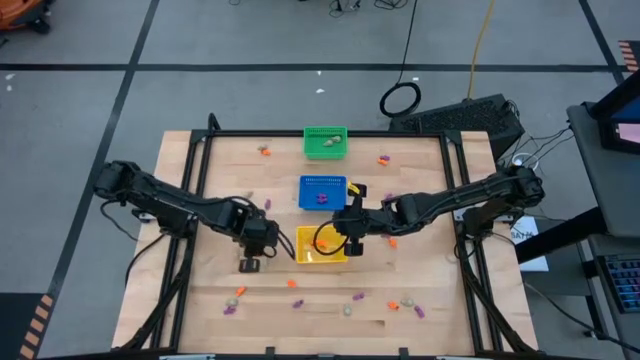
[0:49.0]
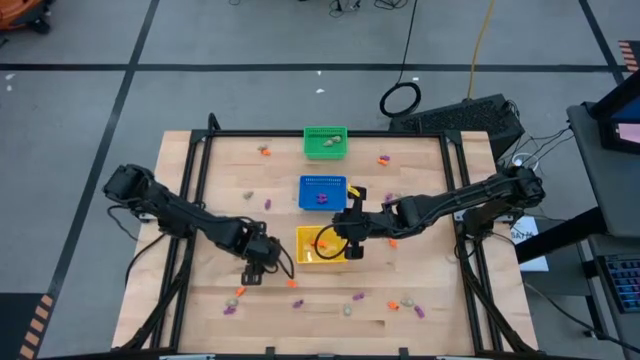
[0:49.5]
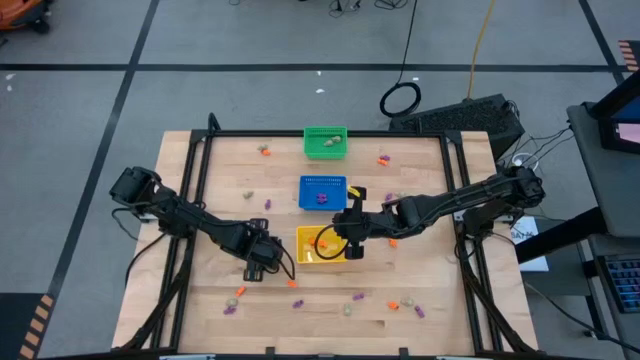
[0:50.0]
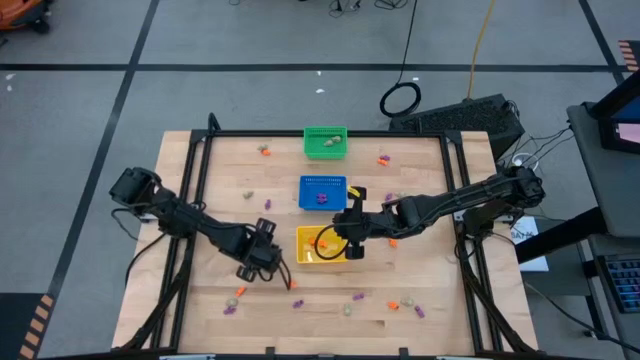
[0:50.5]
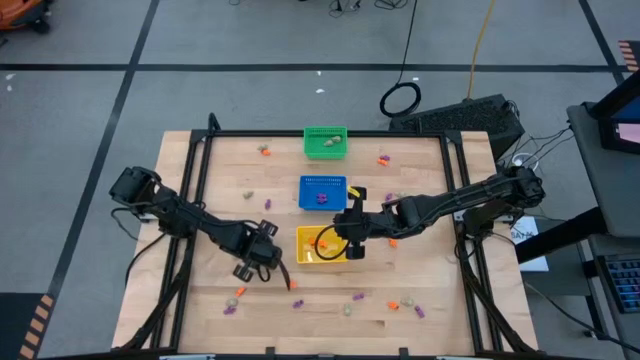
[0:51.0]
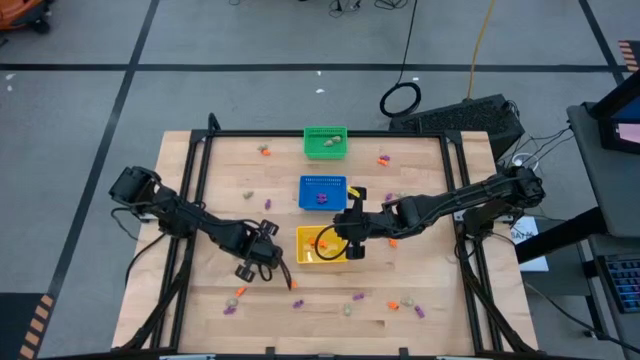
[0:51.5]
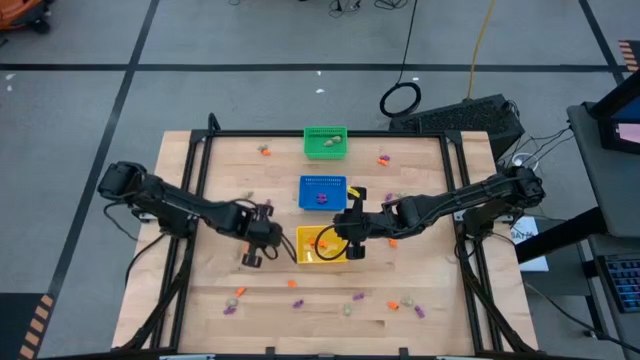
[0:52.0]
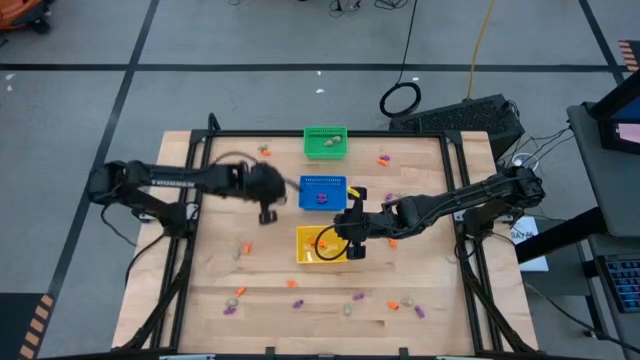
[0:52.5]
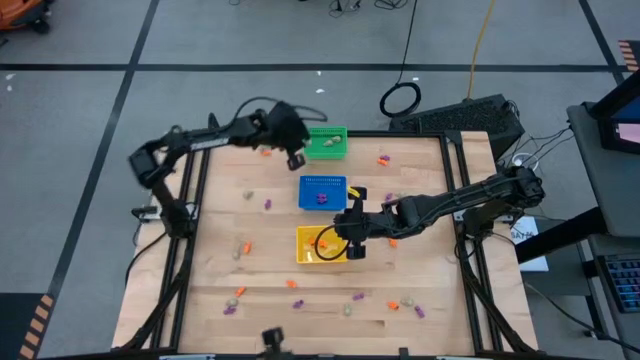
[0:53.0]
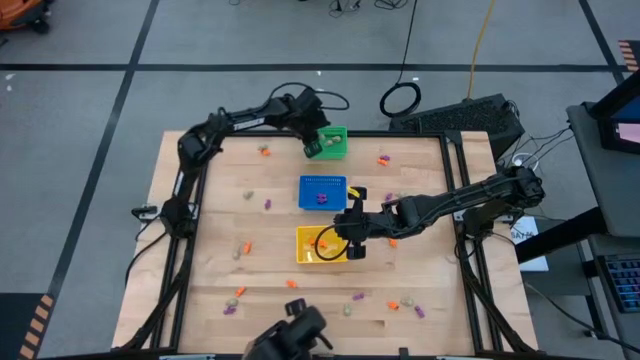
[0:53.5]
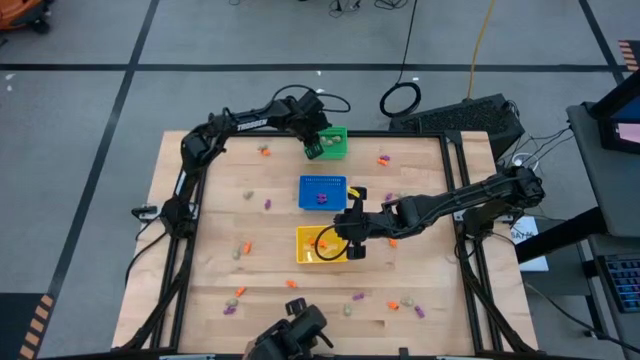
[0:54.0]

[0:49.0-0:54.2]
Task: Sort Halloween decoration
Put the white skull toy into the green bin

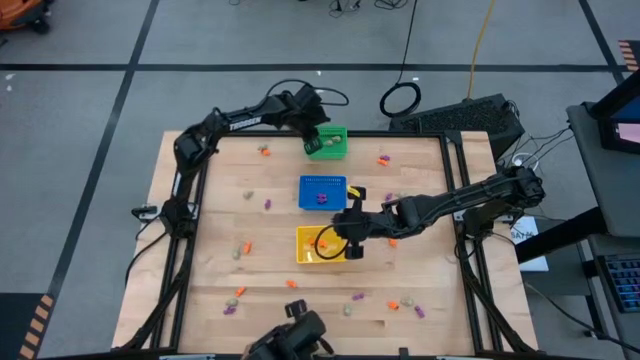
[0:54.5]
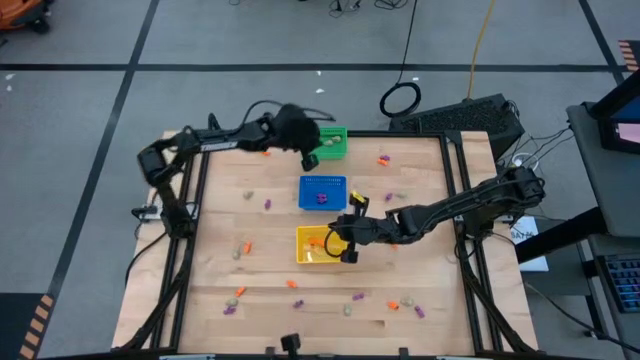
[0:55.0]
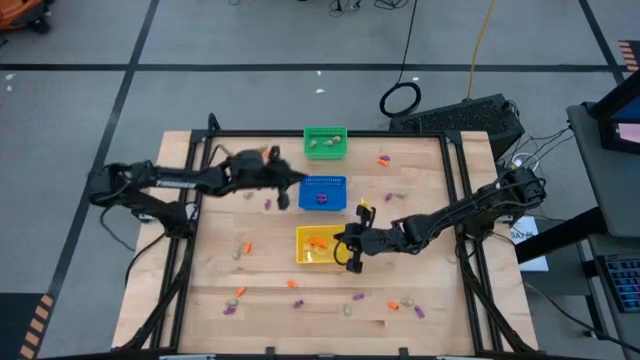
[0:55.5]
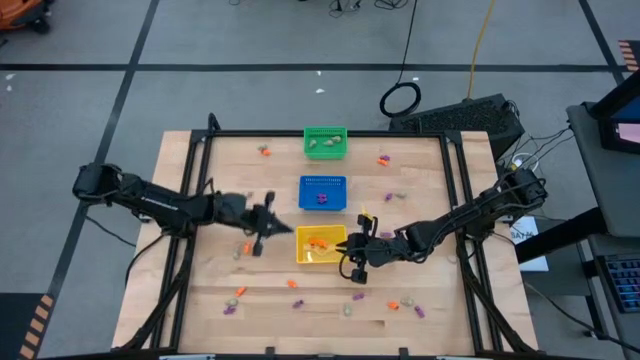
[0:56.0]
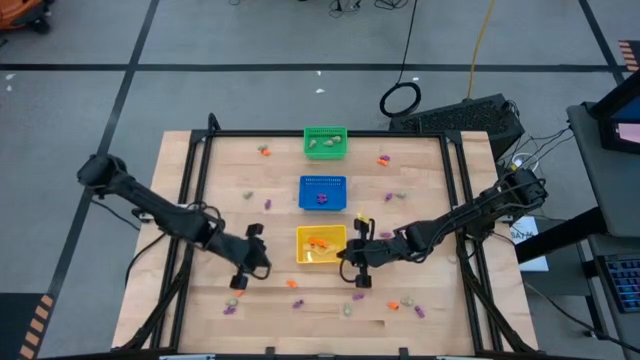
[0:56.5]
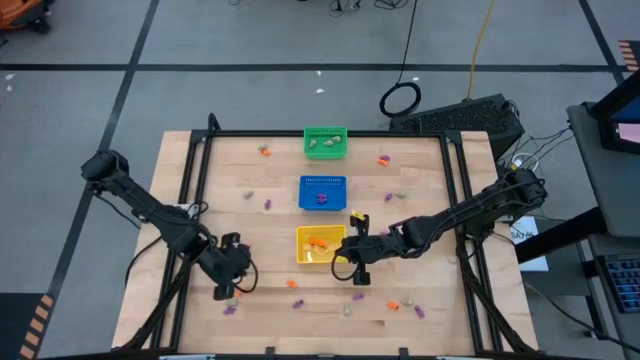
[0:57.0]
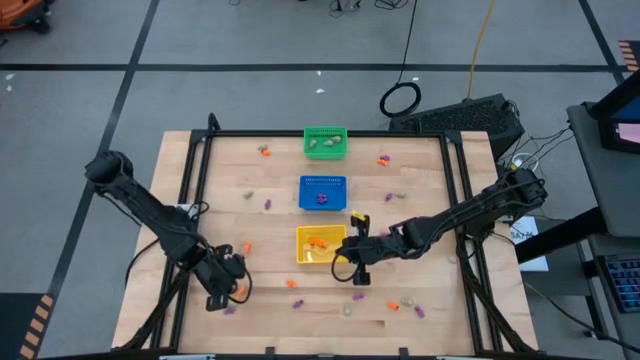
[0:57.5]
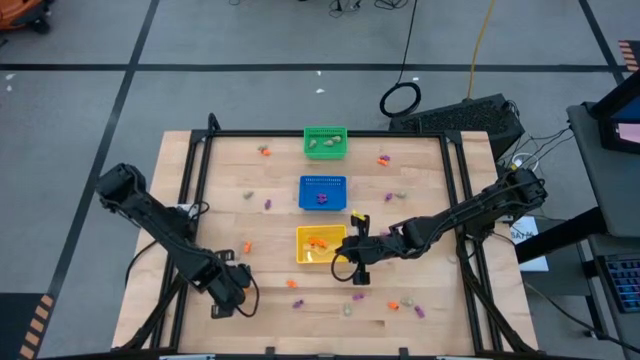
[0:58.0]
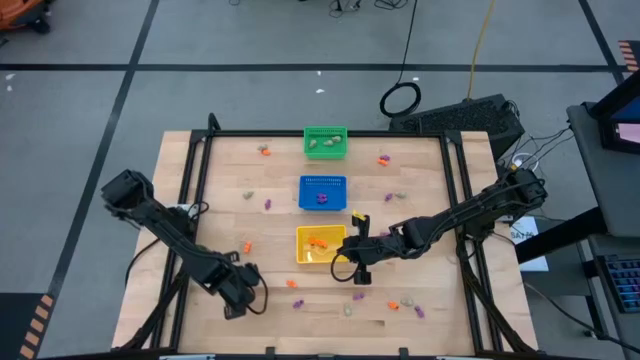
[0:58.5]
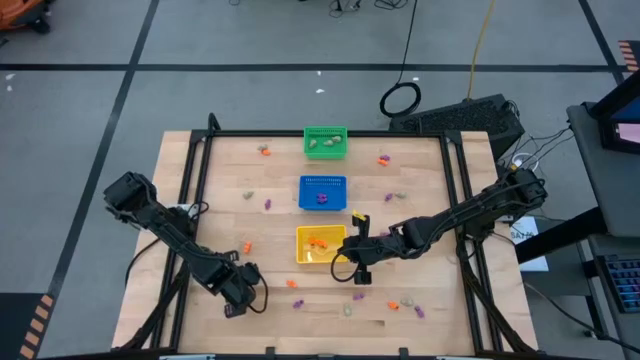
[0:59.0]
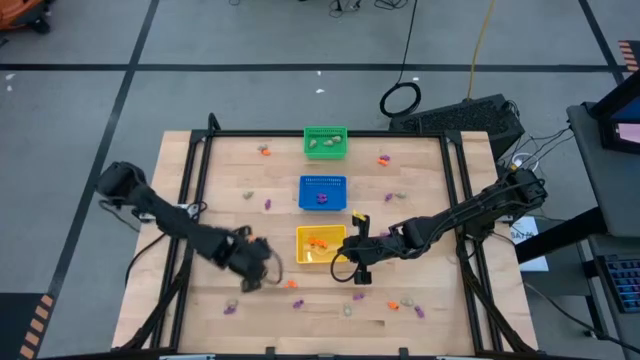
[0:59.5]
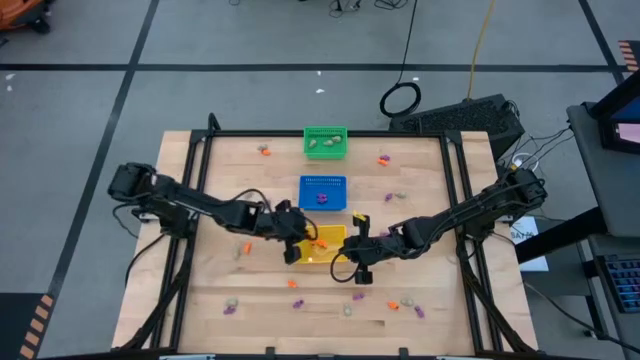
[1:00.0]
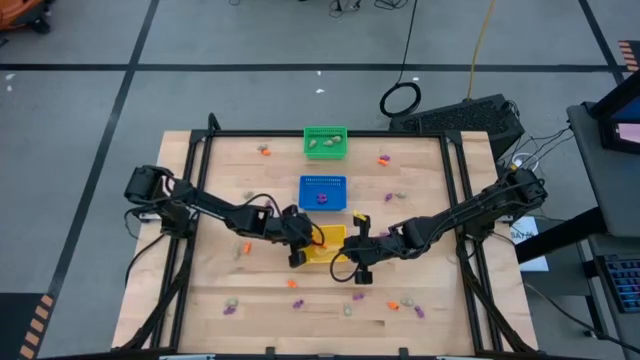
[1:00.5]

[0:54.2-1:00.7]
Put the orange skeleton toy into the yellow bin

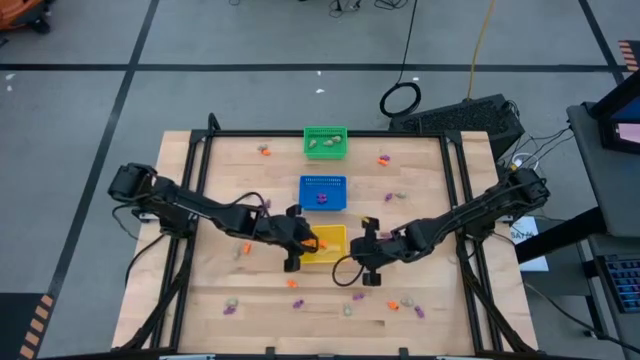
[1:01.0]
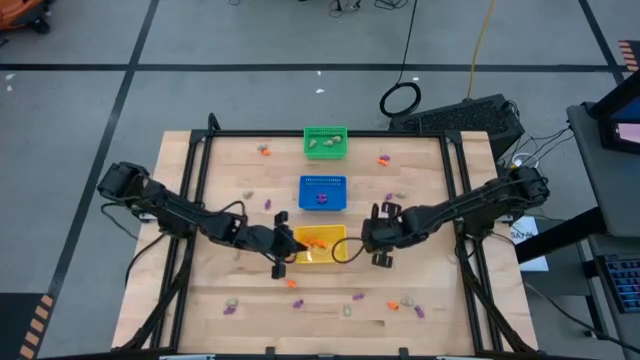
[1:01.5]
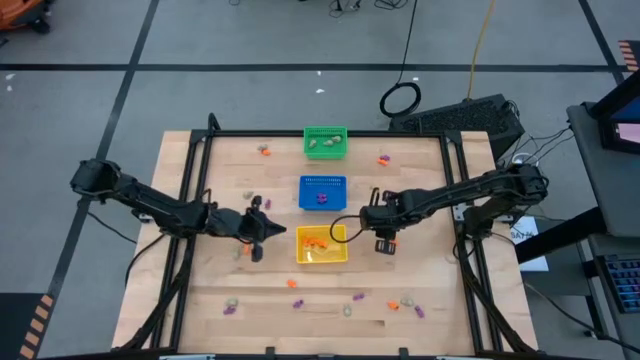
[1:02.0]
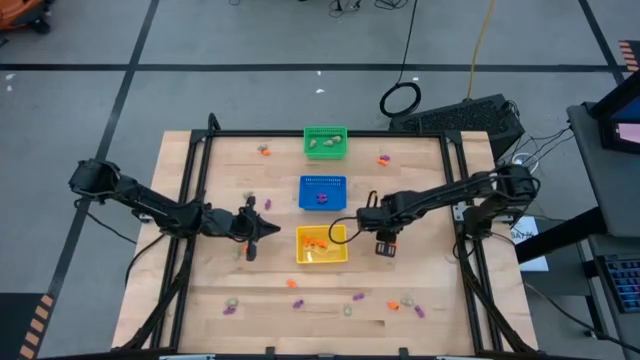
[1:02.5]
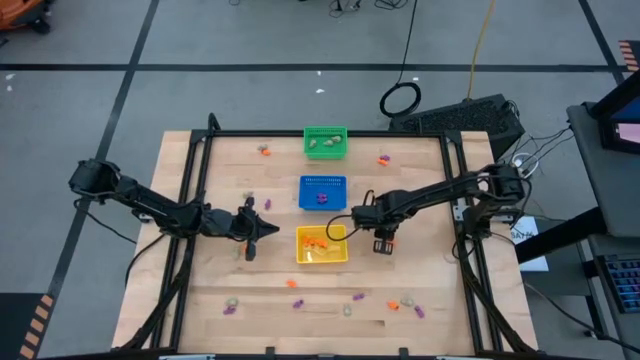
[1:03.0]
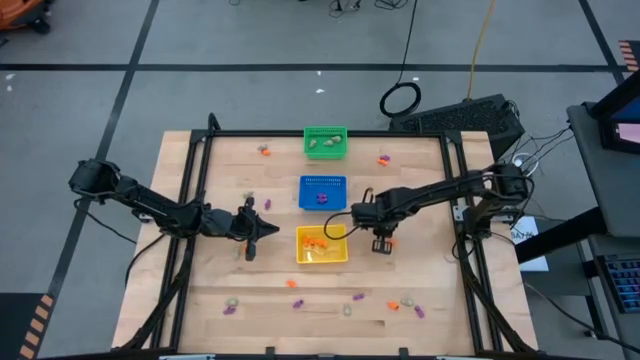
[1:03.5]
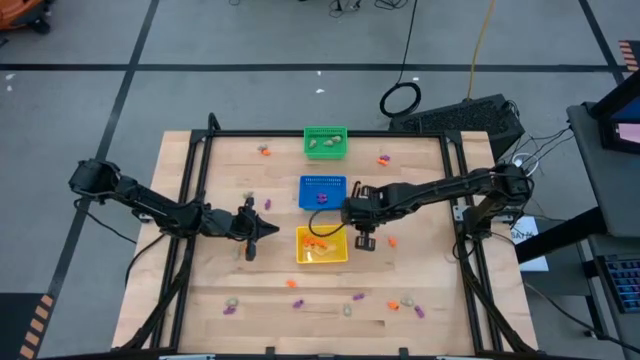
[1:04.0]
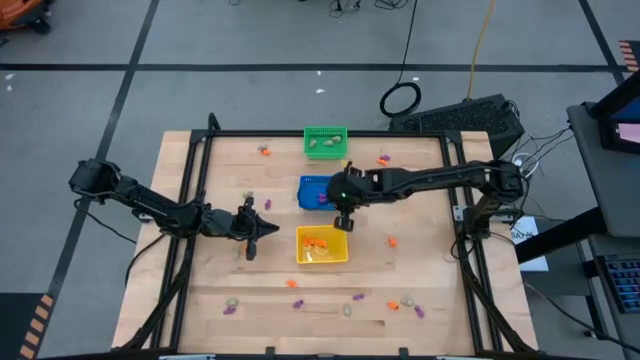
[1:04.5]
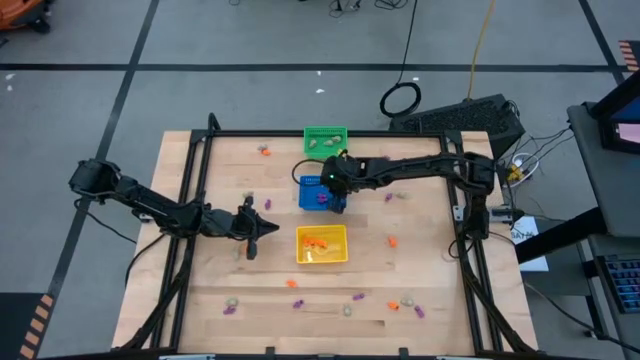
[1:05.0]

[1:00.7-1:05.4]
Put the purple skeleton toy into the blue bin

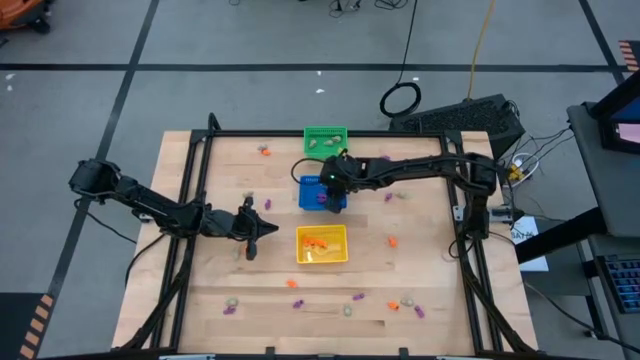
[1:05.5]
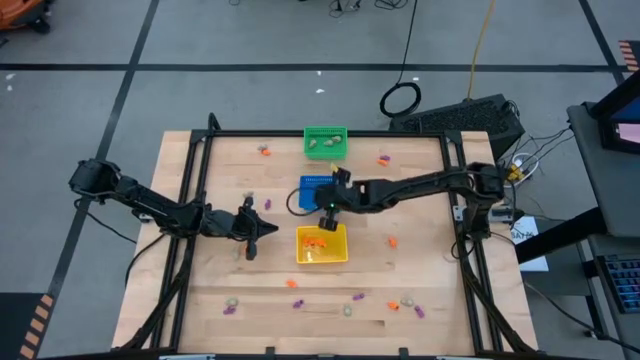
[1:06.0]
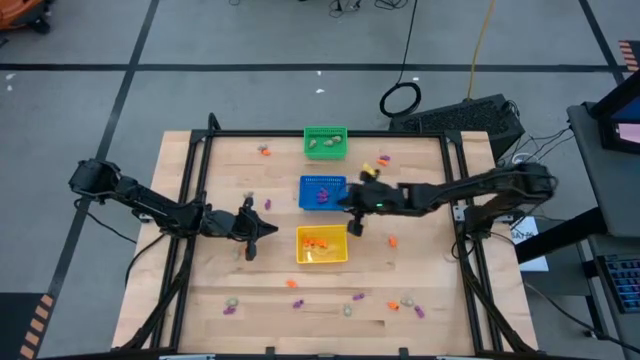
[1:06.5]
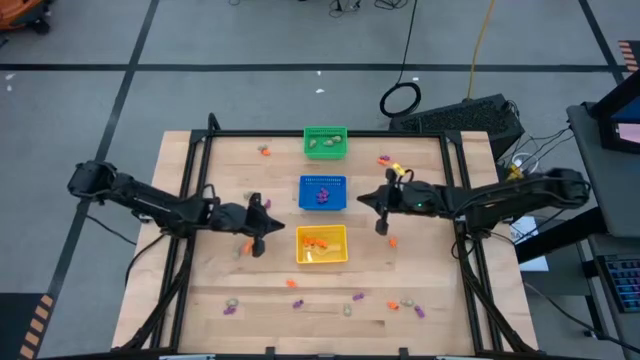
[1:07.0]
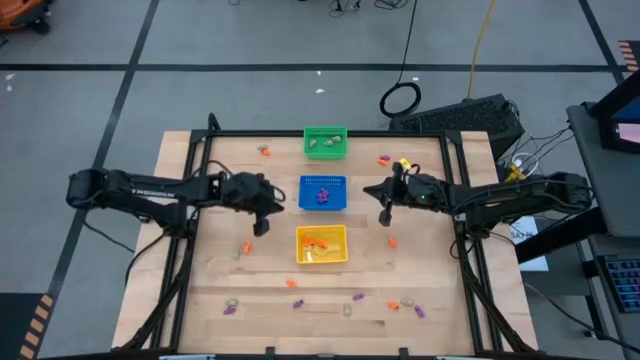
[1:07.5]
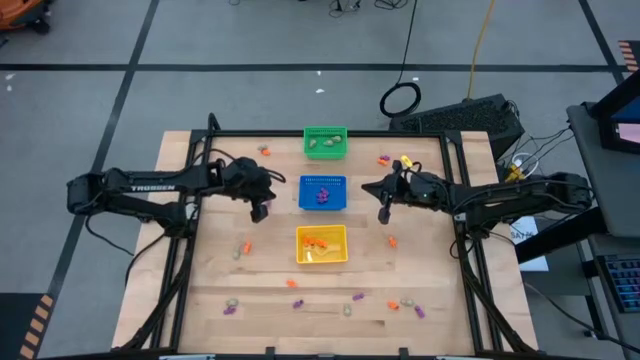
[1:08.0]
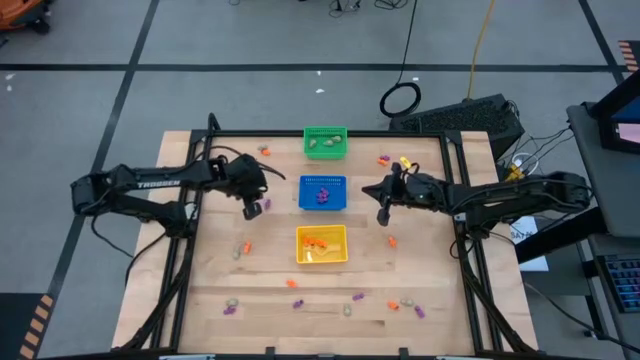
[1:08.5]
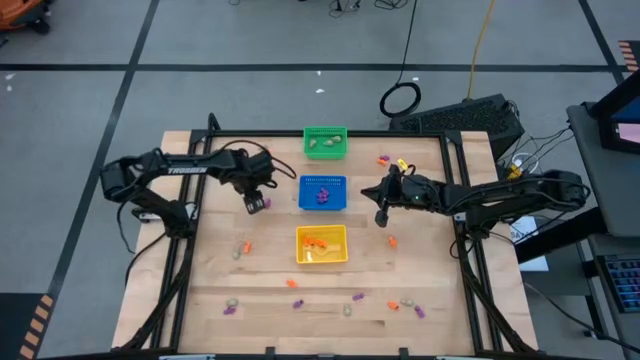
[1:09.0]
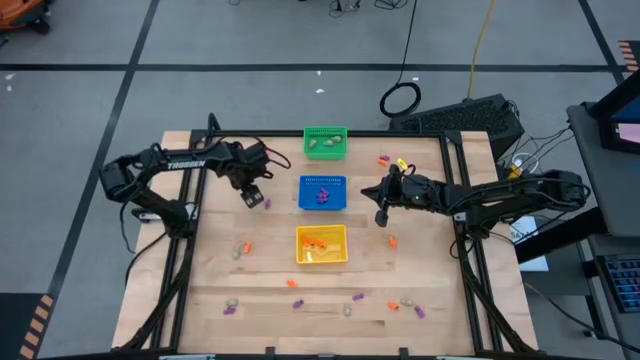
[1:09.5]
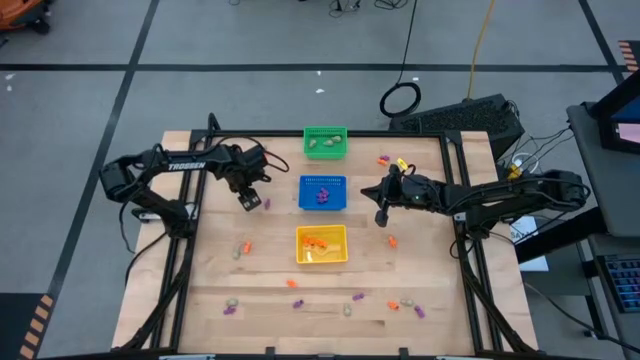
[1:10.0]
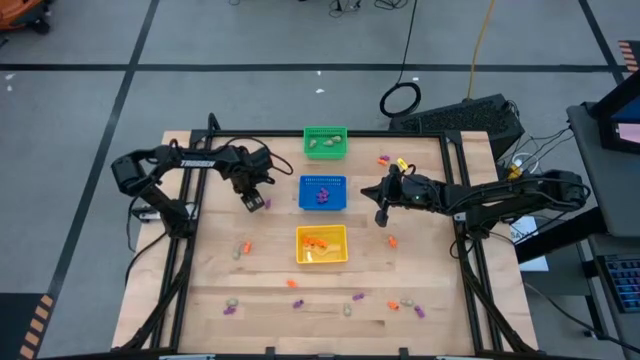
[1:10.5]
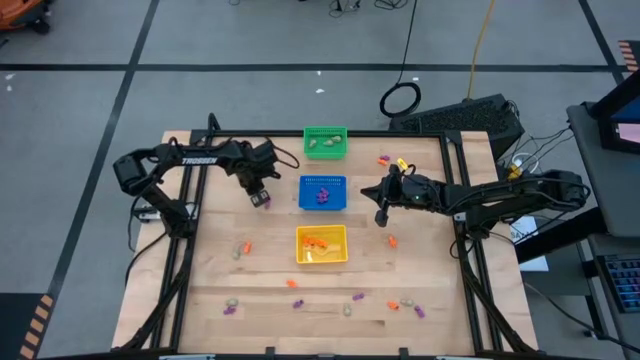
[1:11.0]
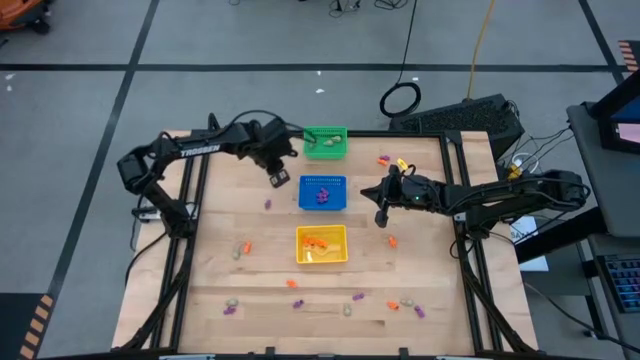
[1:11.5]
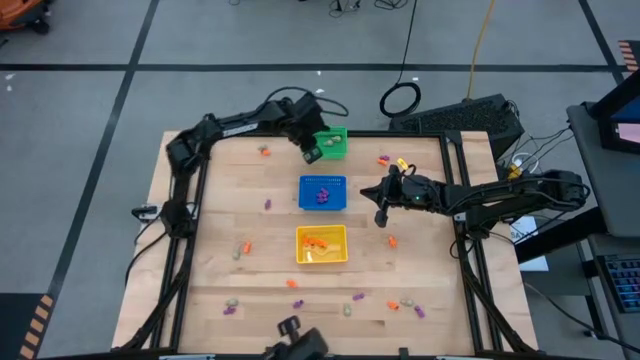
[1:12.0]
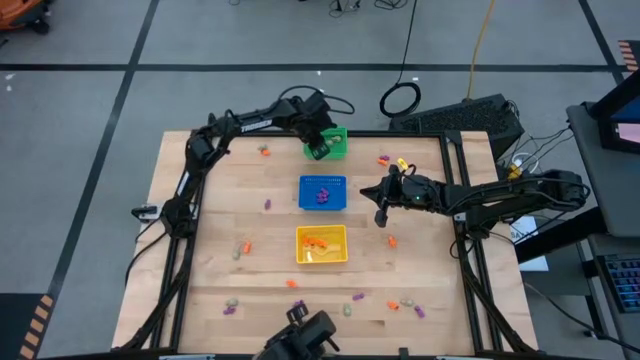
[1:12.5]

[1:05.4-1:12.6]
Put the white skull toy into the green bin
